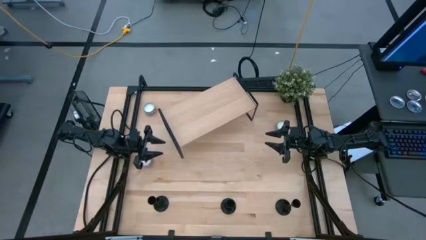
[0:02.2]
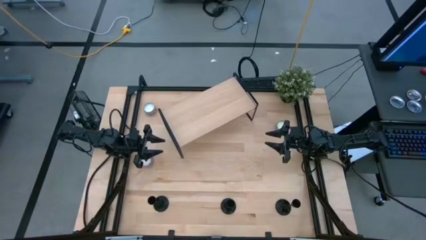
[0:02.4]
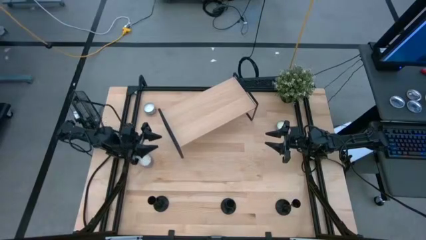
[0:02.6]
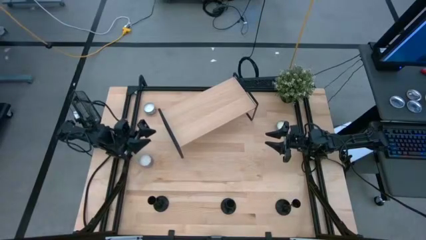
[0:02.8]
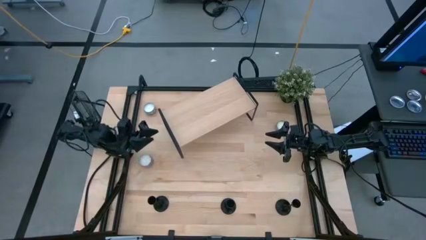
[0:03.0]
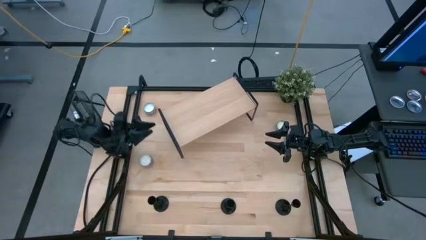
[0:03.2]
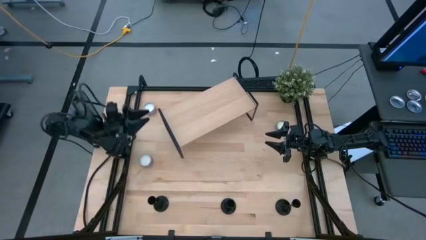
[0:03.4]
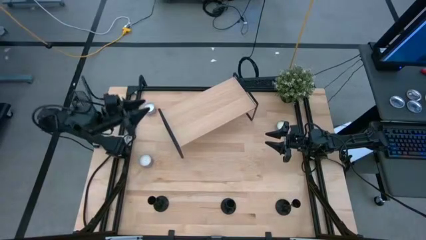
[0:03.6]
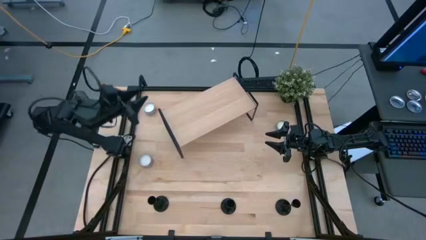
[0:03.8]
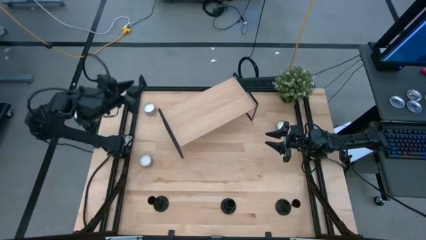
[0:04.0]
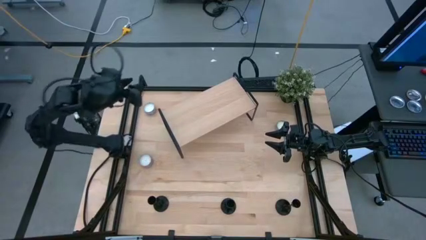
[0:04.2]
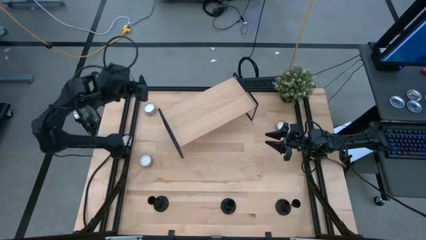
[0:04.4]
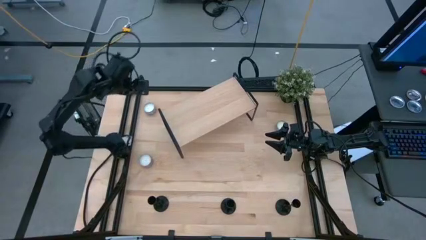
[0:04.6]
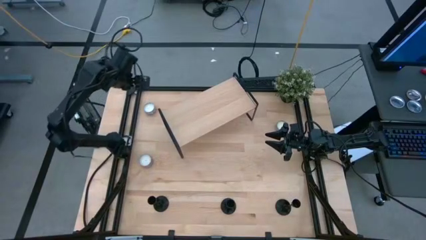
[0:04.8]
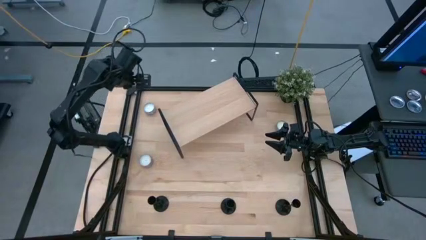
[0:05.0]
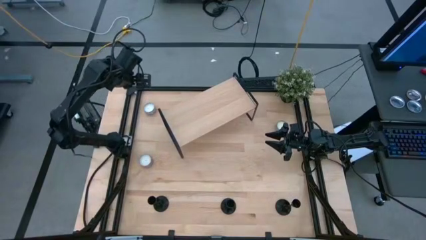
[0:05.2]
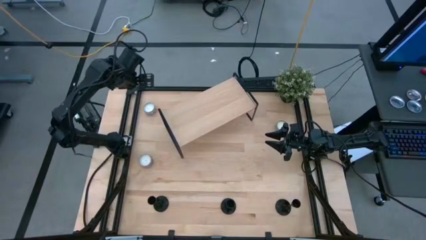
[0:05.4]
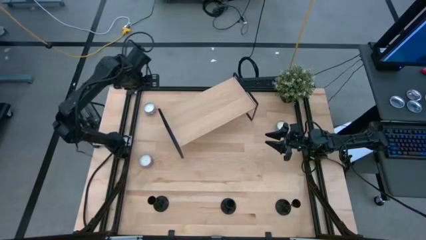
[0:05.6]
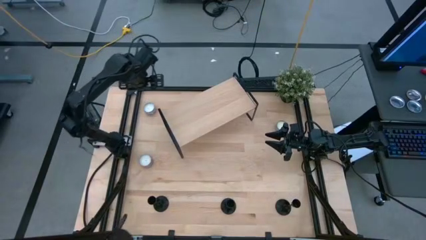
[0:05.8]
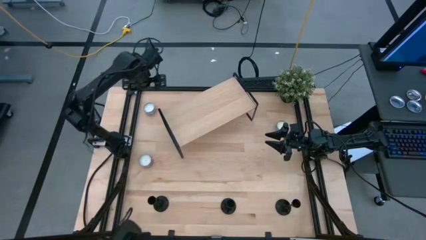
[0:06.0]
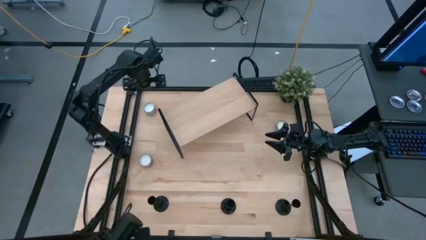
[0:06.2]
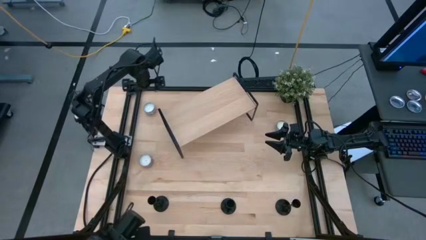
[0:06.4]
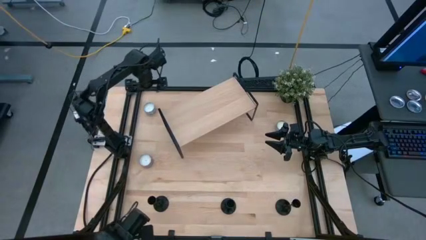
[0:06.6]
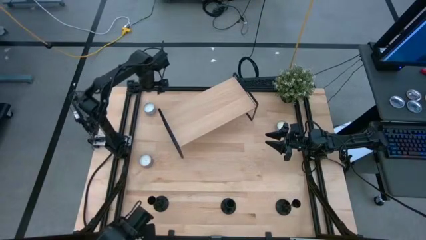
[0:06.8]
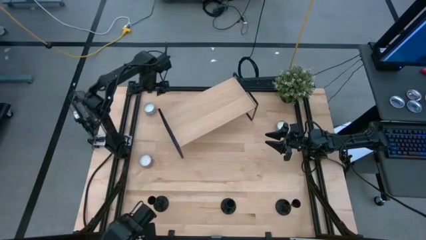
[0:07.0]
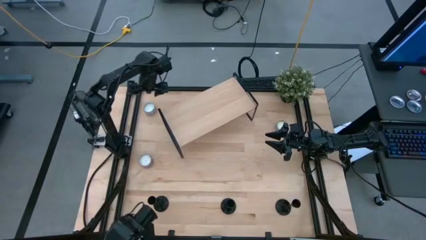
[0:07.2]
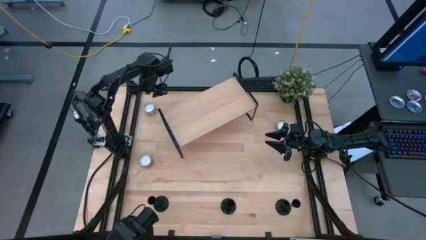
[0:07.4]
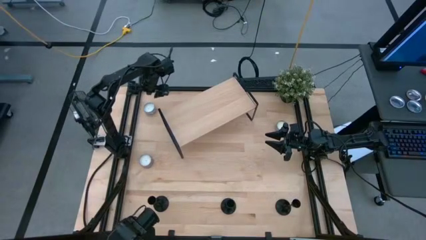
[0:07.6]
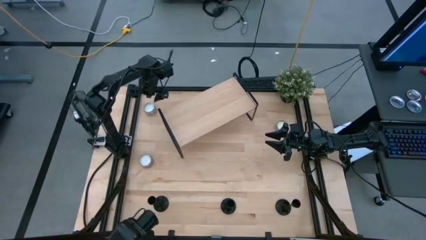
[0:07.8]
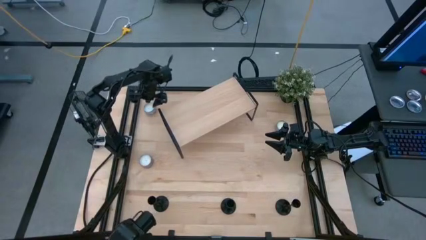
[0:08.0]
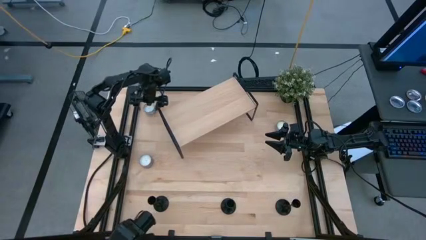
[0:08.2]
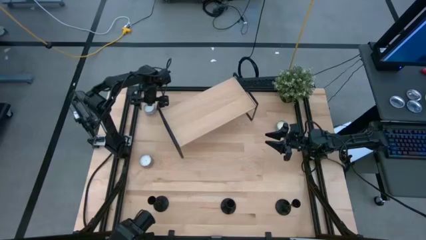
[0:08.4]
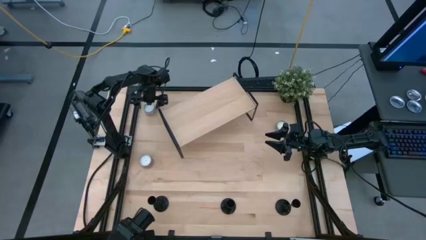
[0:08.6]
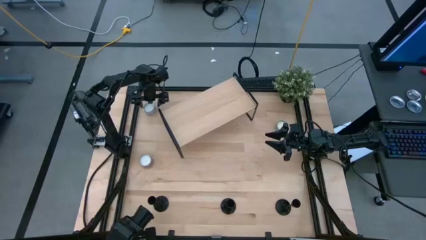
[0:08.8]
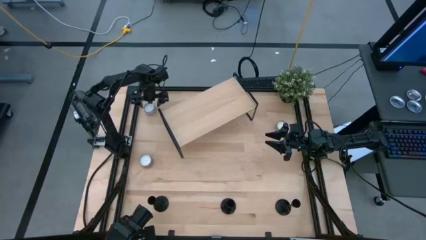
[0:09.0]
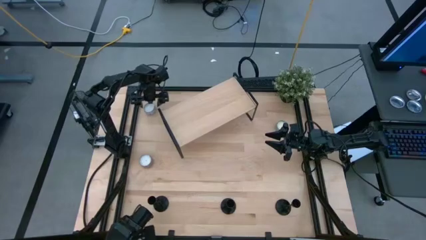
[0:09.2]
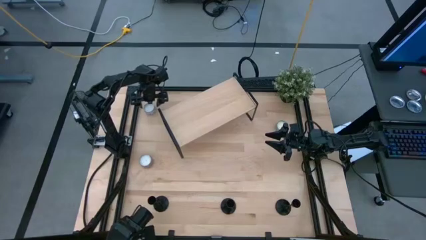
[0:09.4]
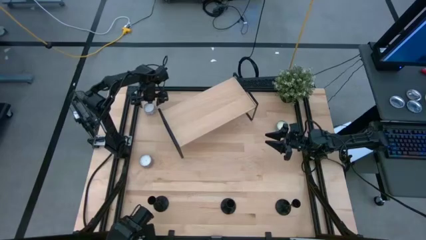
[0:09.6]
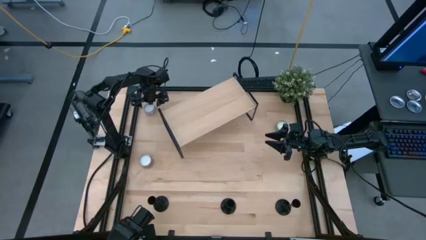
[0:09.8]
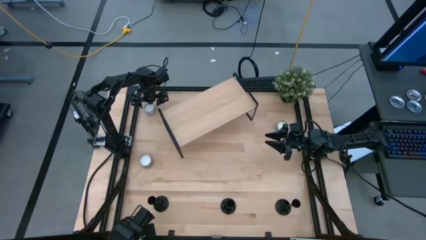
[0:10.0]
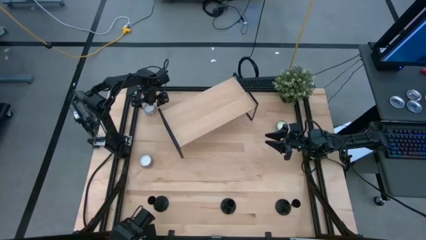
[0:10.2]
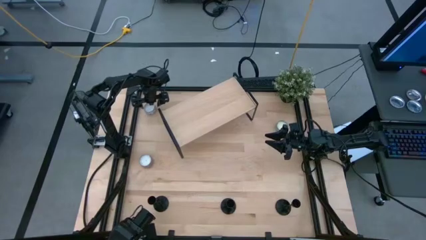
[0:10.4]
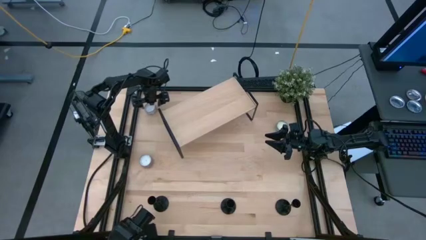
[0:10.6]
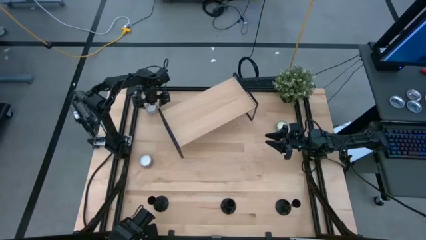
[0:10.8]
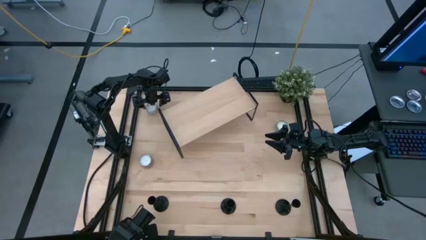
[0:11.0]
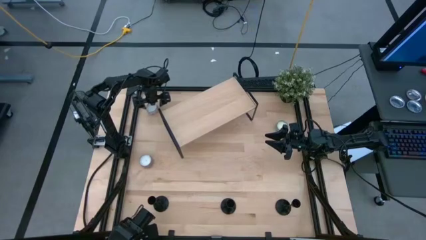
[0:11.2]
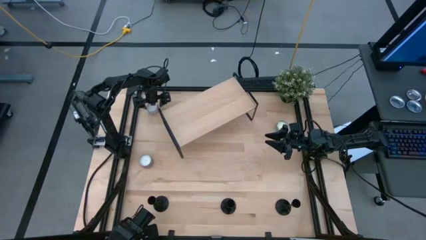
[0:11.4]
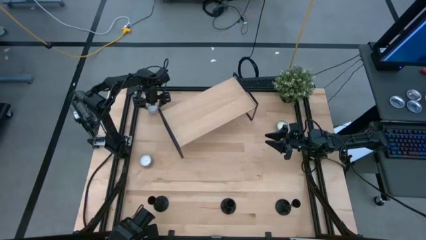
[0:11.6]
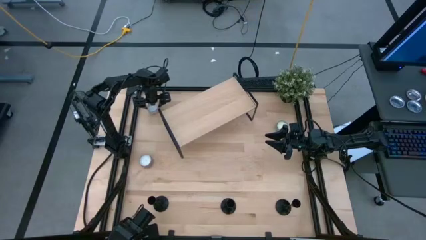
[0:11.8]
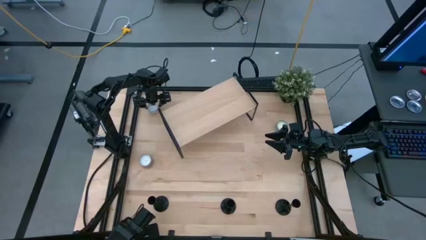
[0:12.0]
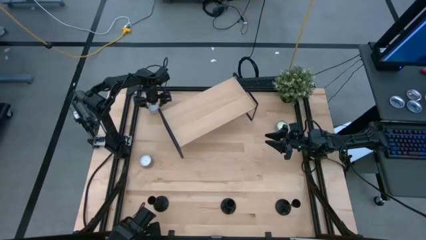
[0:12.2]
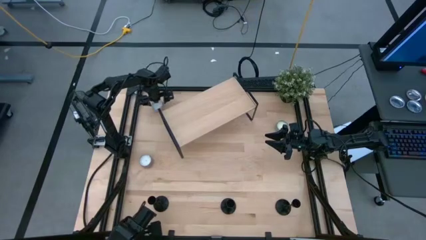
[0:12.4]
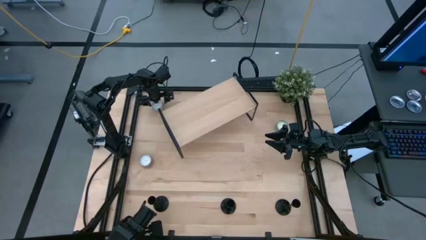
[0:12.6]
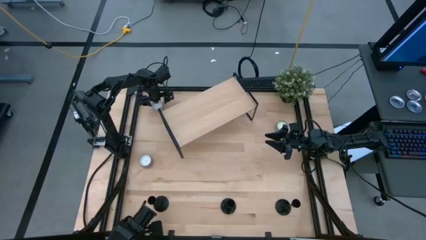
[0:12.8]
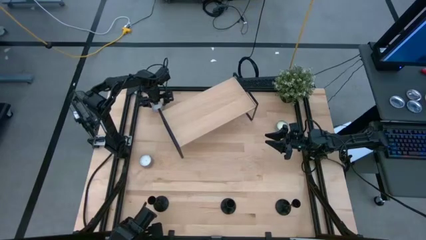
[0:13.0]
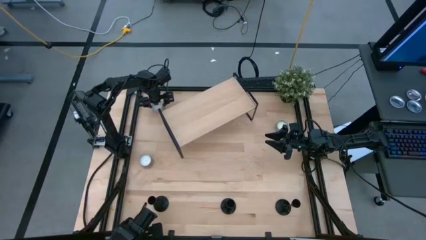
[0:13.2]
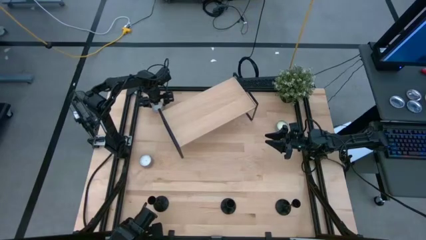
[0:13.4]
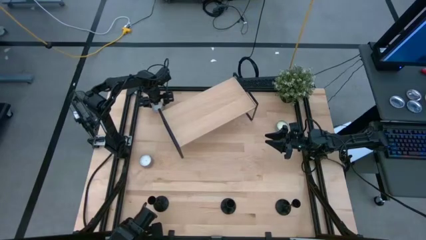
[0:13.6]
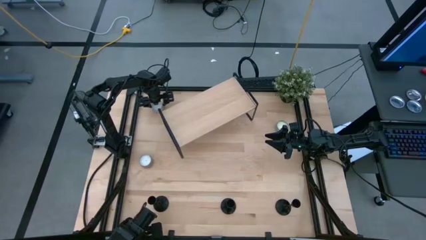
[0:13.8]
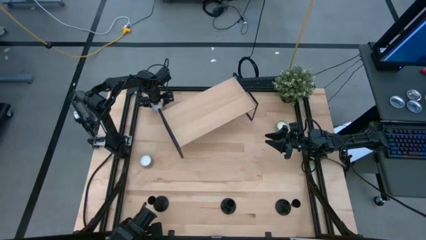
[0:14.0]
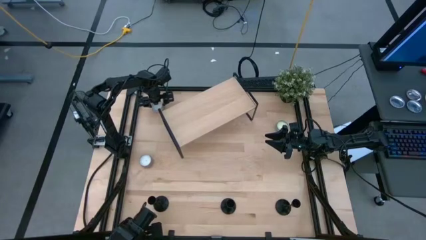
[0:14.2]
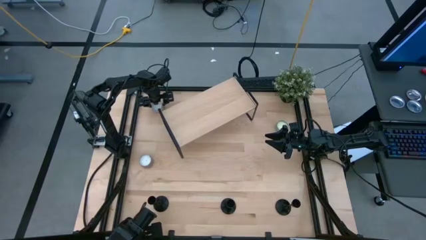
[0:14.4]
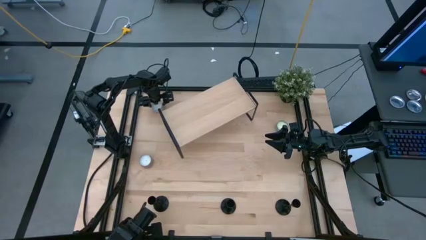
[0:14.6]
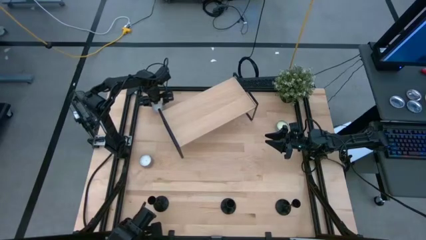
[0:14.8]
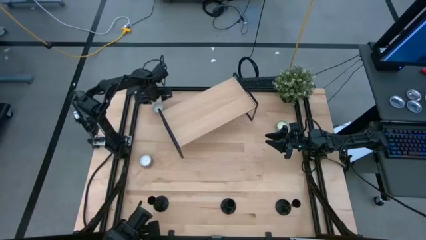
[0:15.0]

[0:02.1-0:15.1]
Task: Pick & Place candle stick holders
Put the red patterned scented candle on the shelf

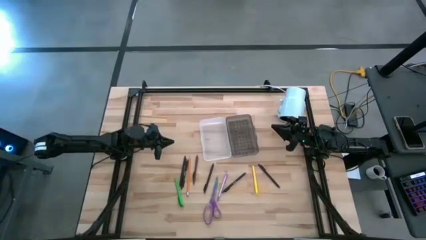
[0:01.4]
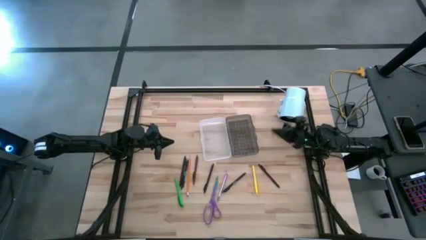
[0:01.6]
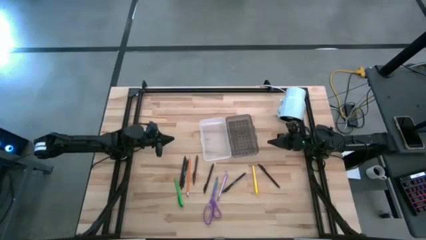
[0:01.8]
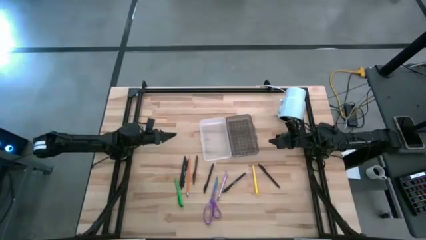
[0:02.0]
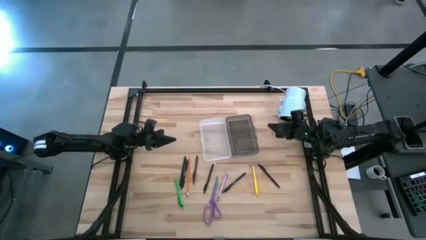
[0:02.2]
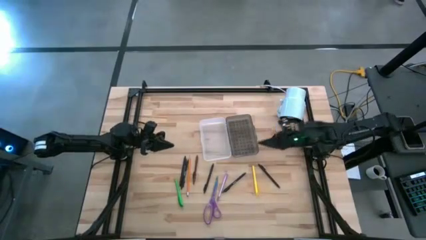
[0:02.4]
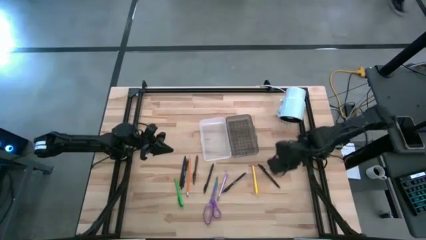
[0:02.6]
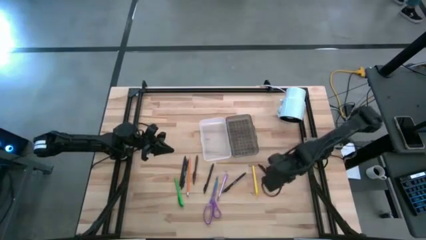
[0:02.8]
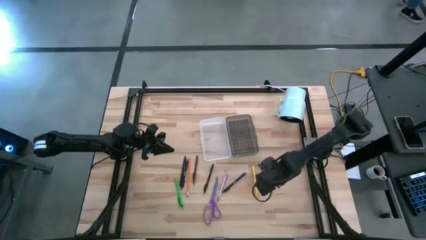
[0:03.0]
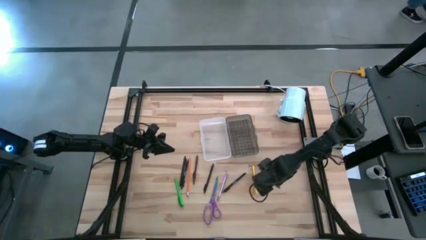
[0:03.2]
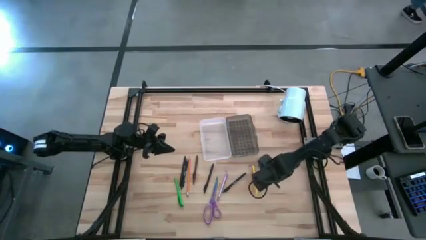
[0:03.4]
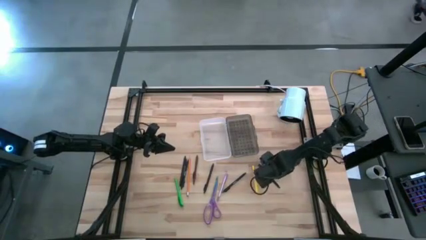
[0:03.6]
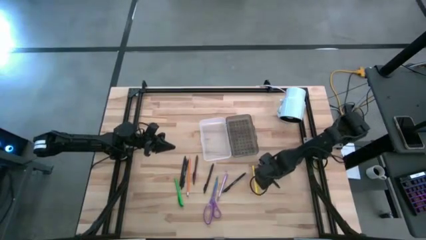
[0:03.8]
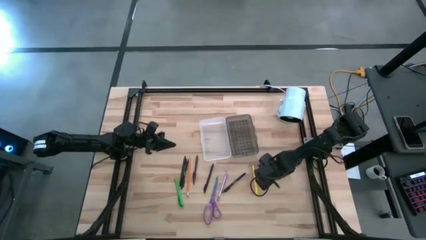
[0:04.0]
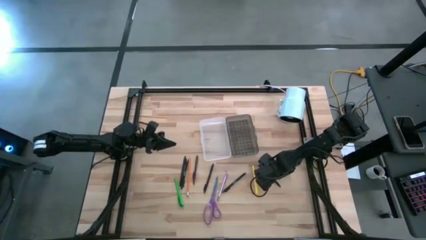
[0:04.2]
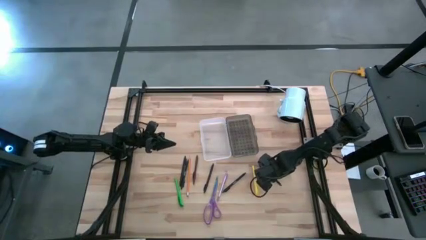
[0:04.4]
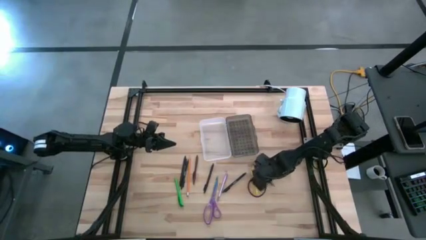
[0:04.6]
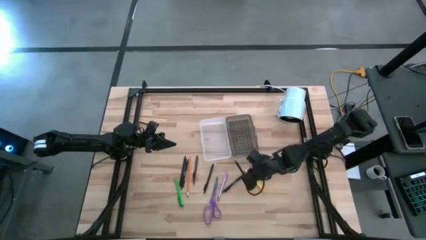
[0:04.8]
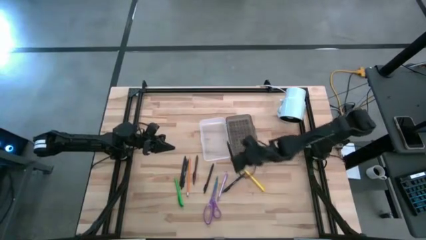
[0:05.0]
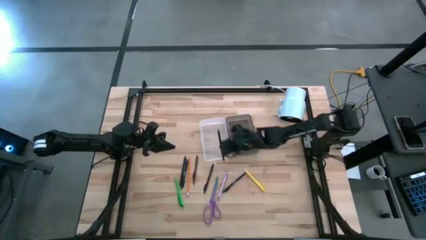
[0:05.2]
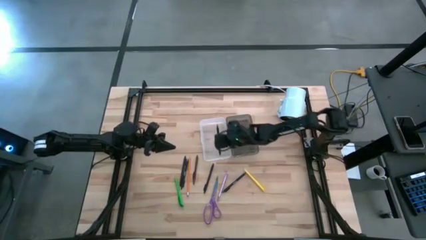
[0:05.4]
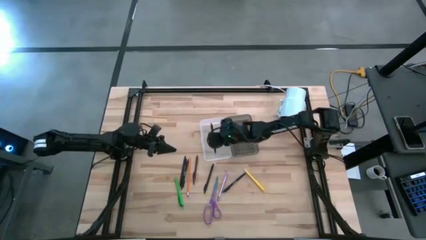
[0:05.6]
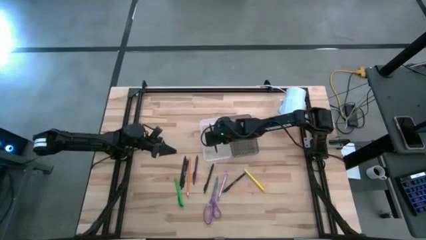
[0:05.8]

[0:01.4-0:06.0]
Task: Pick & place school supplies into a supply box
Put the black pen into the supply box
